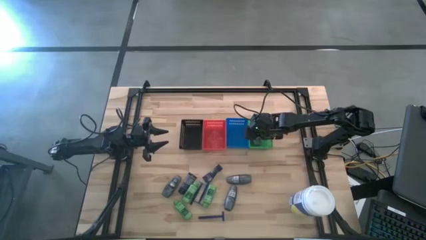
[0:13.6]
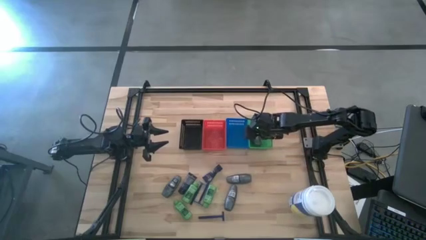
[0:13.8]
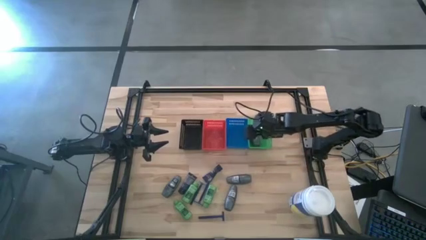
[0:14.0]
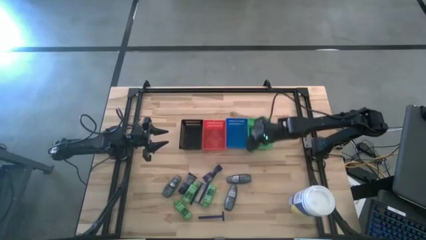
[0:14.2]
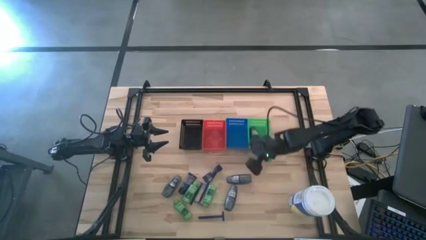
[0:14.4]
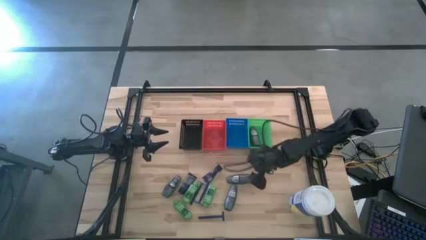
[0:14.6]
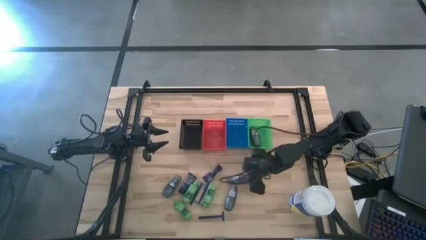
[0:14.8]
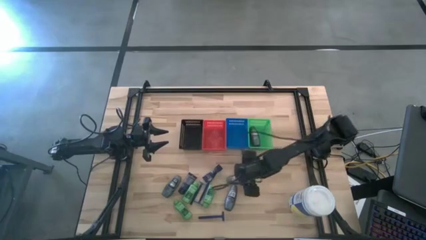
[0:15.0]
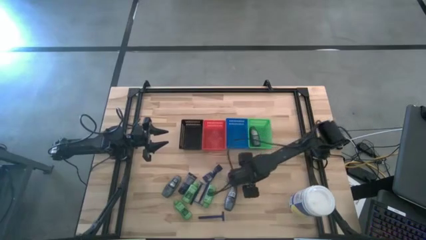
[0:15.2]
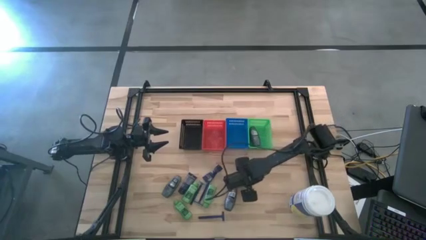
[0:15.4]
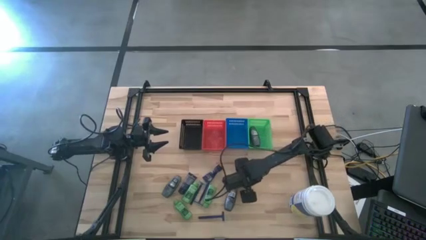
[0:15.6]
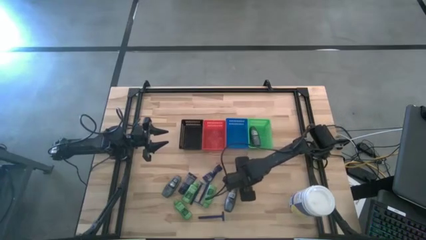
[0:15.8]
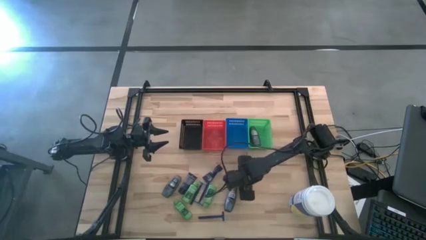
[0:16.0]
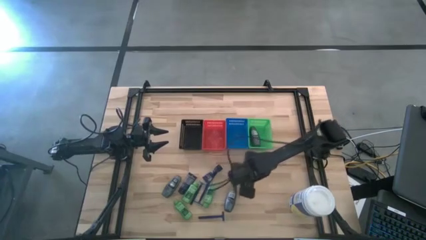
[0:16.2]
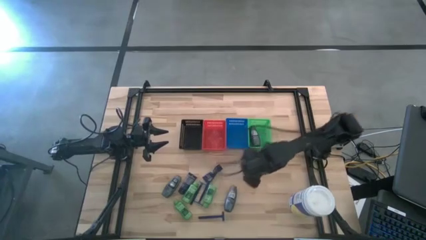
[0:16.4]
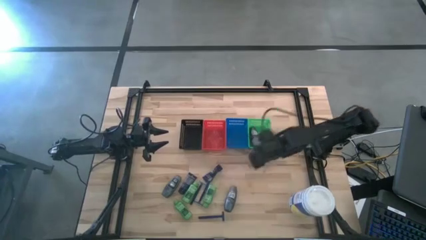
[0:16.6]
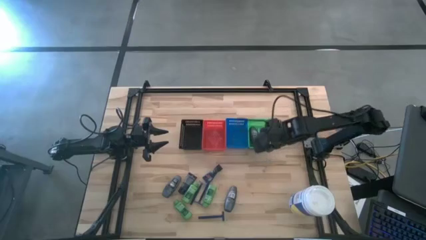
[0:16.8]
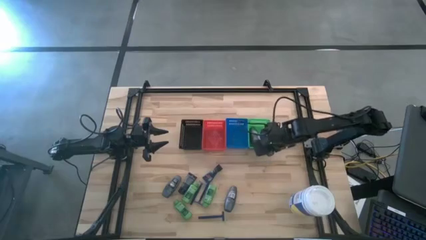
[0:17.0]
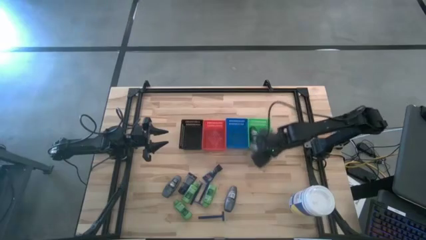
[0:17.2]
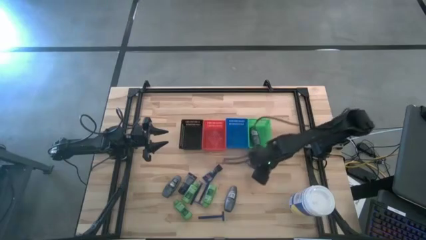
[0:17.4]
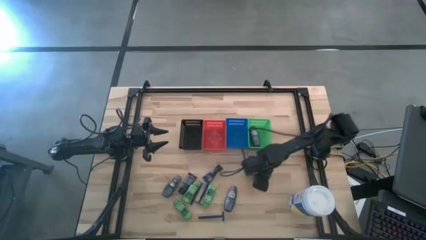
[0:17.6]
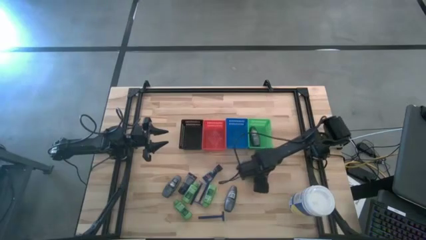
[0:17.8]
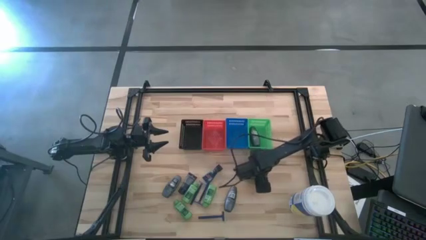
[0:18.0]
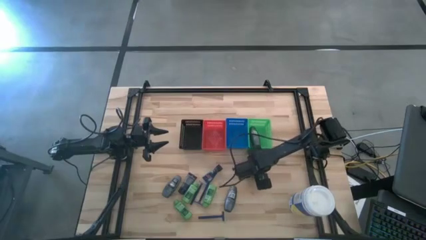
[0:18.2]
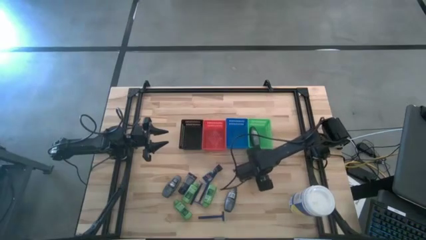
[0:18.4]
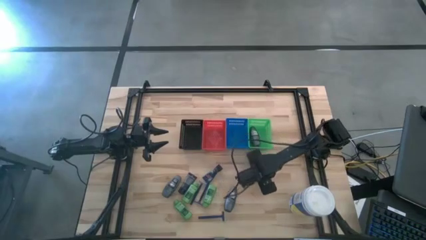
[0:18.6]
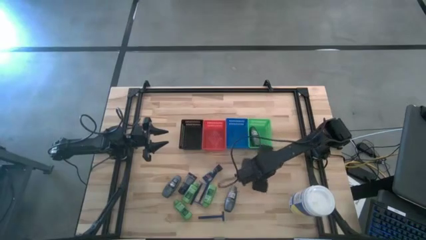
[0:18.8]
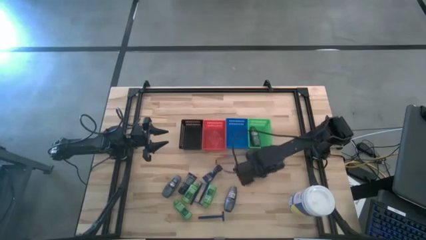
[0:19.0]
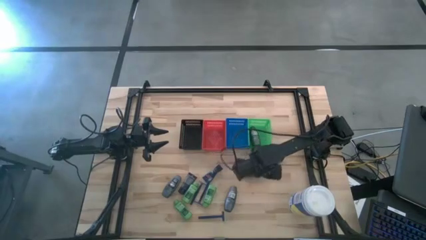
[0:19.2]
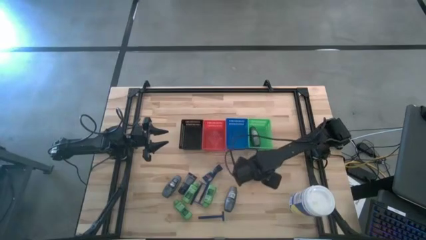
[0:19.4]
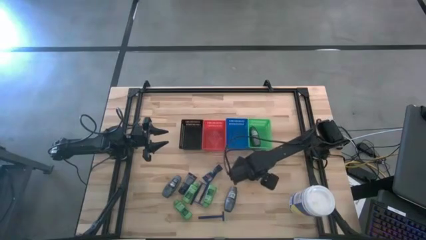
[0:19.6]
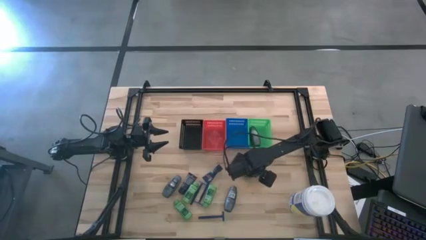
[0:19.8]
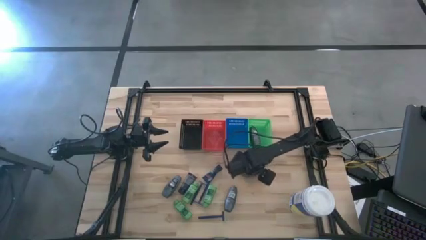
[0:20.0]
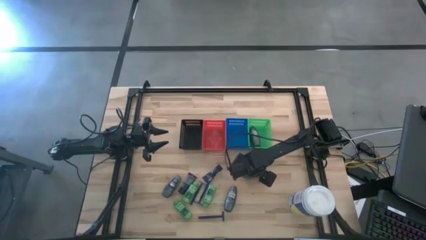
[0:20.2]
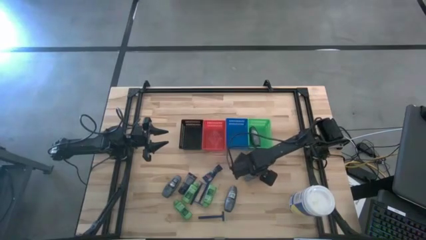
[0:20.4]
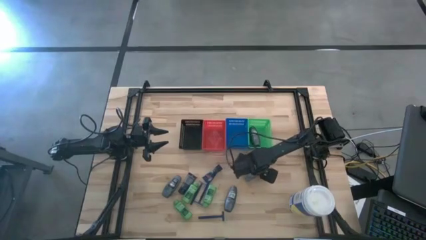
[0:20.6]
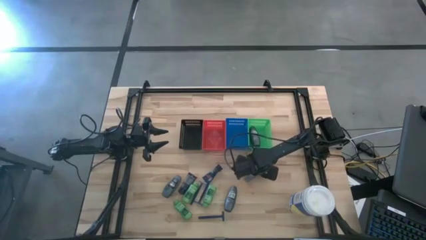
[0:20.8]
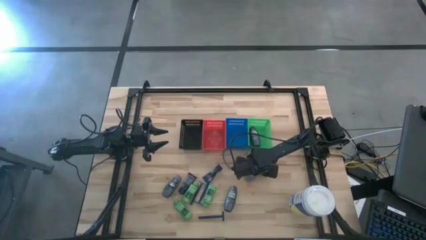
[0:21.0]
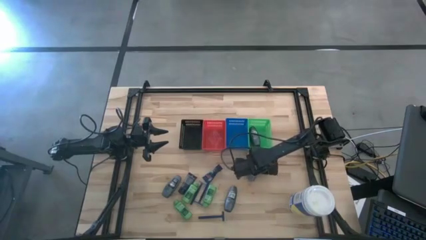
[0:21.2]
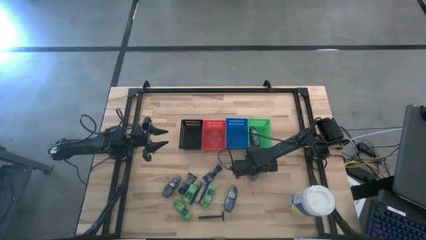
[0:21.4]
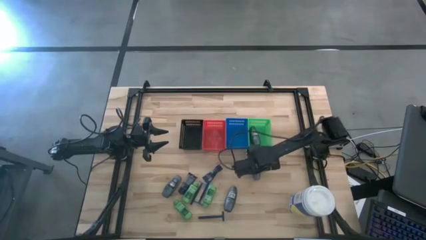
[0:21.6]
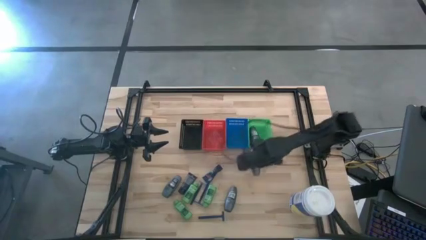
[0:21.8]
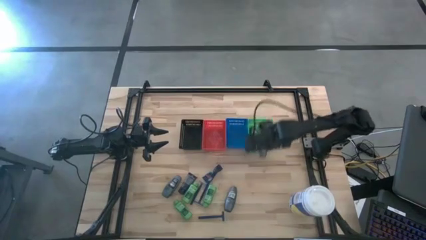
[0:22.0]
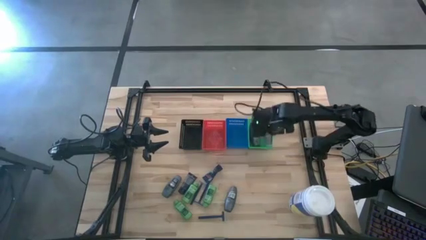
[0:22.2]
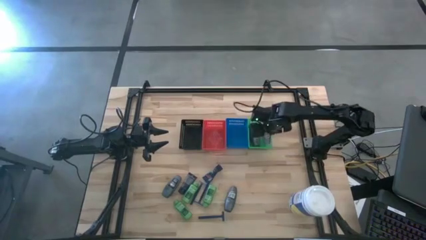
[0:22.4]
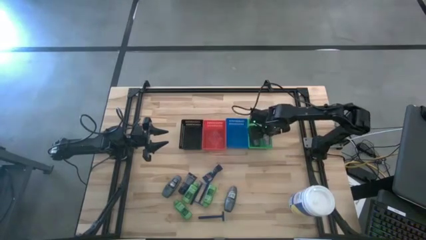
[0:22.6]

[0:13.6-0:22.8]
Task: Pick & Place Travel size toiletries
Put the black deodorant into the green basket

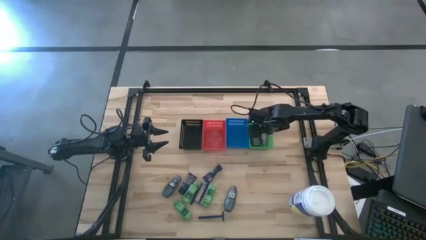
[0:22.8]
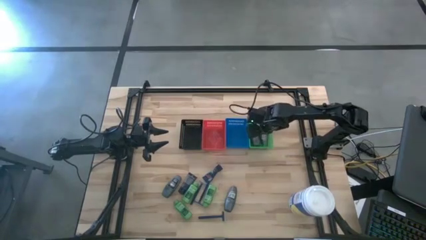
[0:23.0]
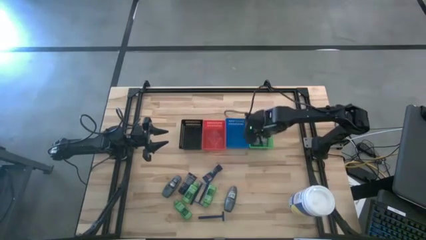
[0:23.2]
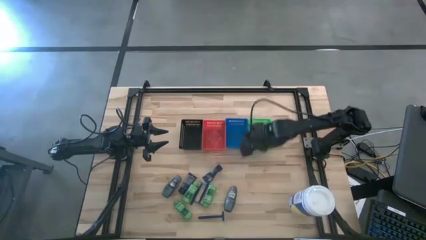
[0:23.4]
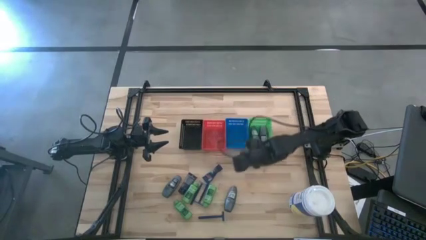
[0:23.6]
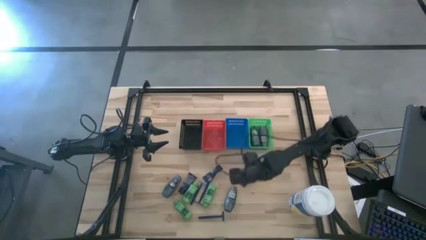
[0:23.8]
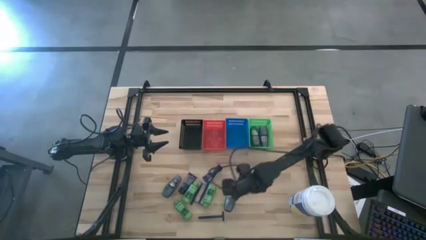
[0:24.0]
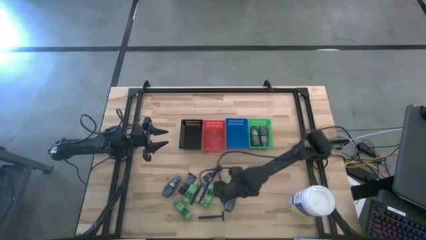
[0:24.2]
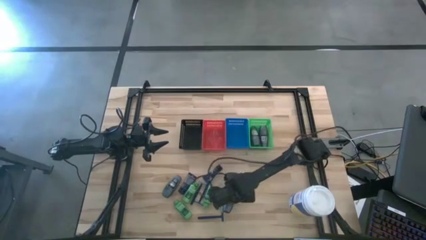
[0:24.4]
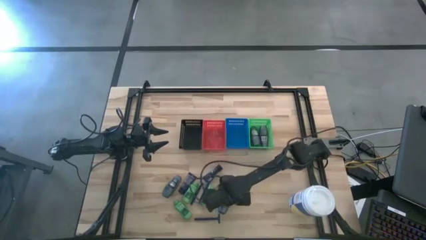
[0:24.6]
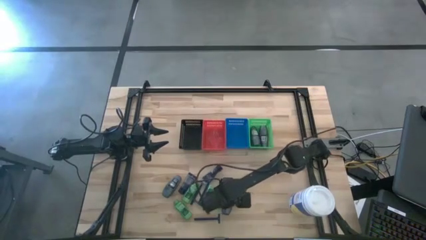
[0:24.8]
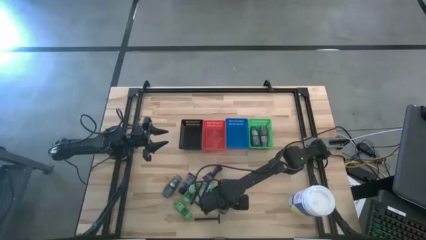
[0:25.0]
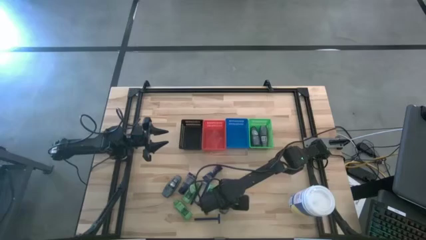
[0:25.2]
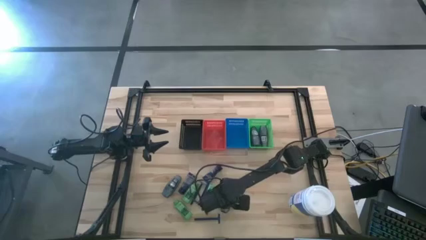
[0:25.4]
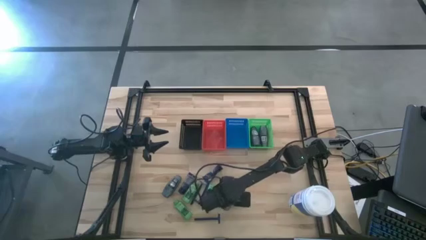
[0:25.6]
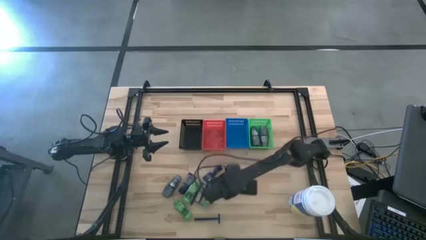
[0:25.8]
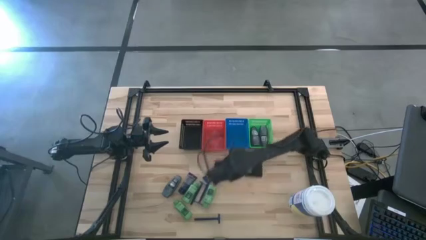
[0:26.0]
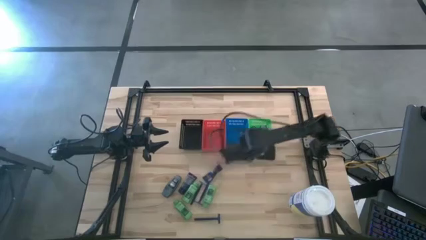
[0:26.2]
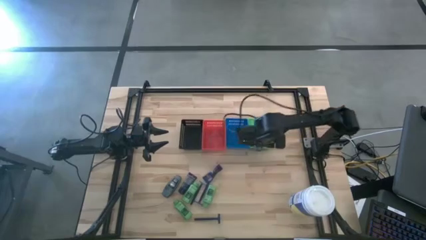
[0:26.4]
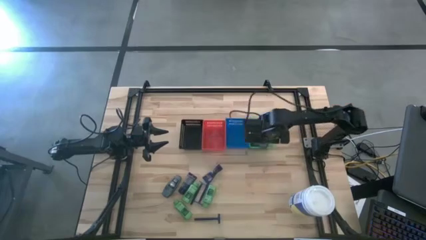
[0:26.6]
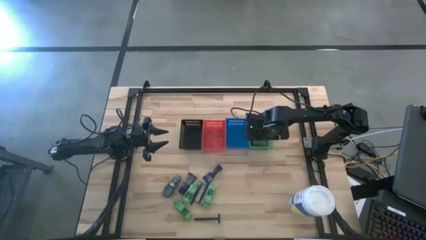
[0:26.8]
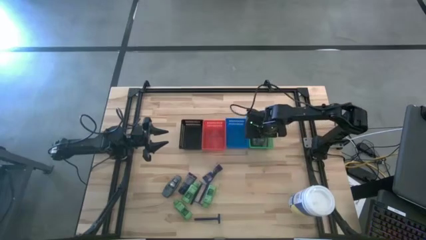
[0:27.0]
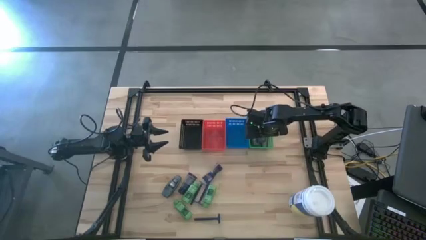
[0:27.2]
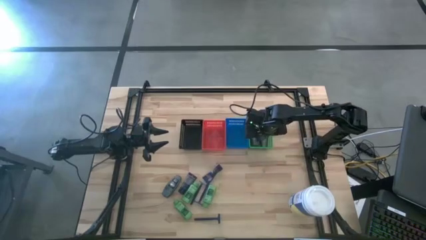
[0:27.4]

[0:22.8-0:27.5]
Put the black deodorant into the green basket

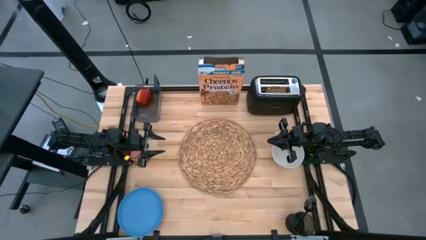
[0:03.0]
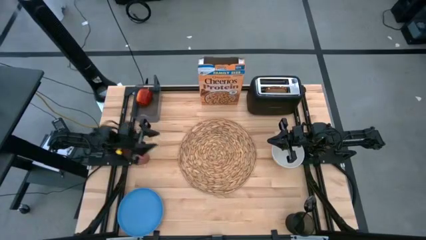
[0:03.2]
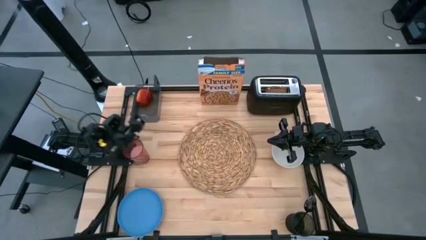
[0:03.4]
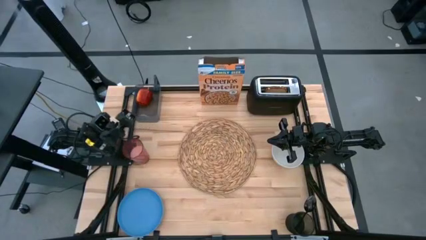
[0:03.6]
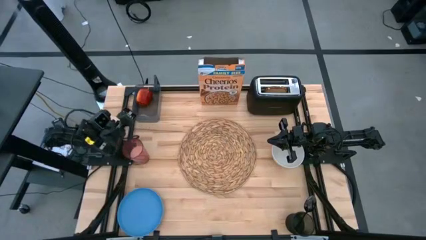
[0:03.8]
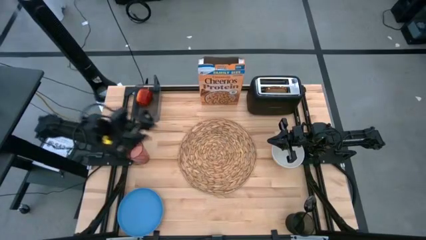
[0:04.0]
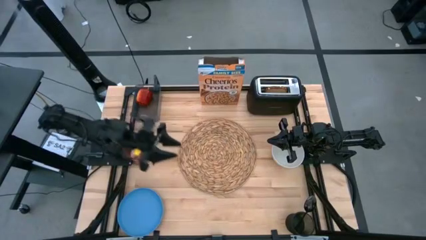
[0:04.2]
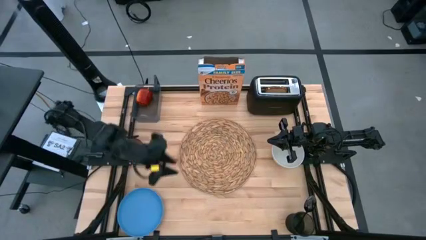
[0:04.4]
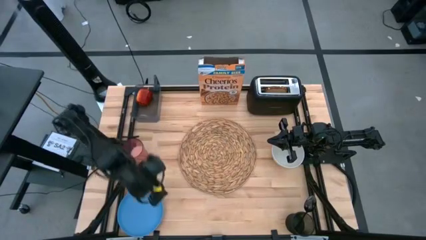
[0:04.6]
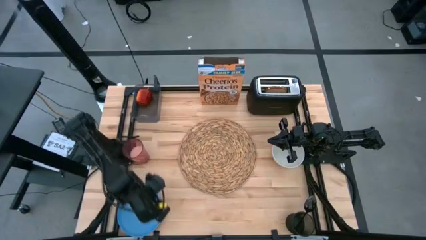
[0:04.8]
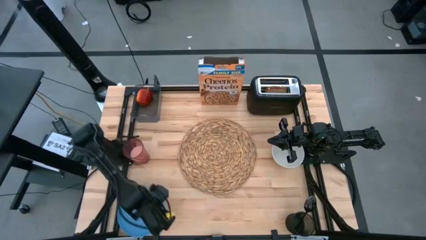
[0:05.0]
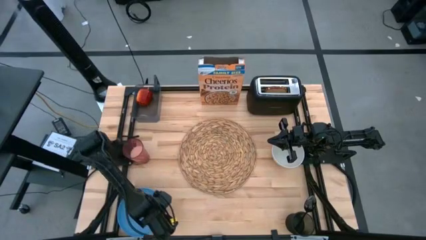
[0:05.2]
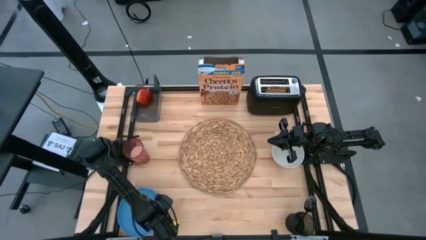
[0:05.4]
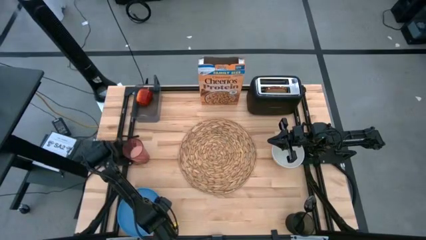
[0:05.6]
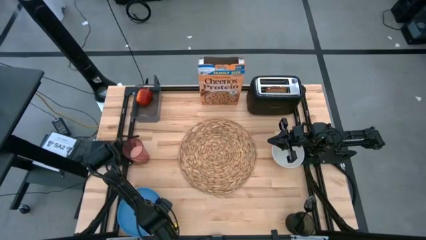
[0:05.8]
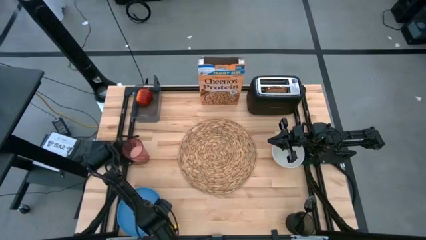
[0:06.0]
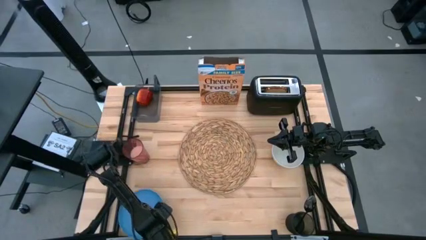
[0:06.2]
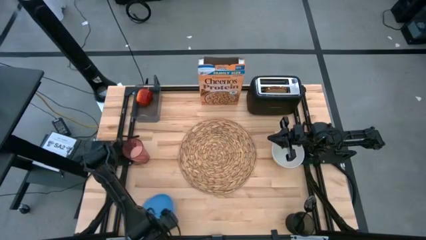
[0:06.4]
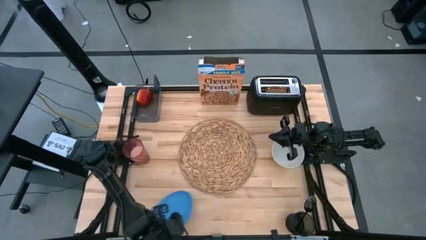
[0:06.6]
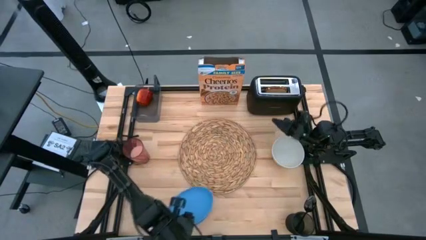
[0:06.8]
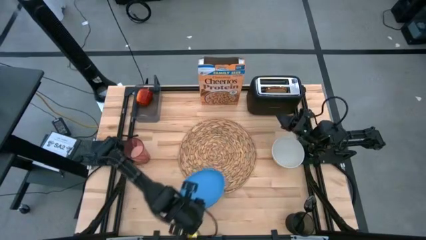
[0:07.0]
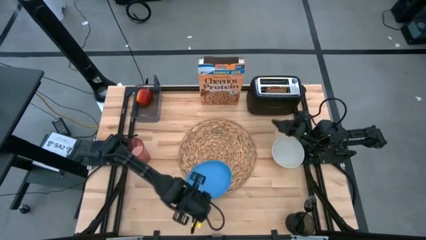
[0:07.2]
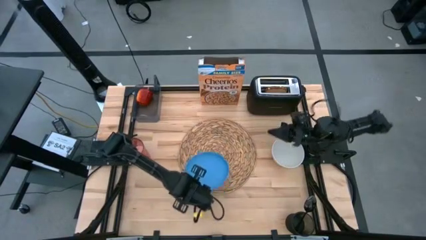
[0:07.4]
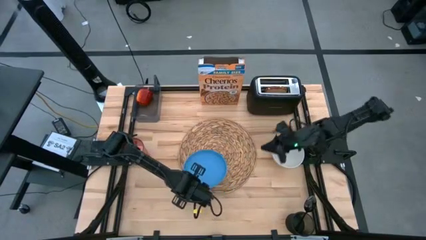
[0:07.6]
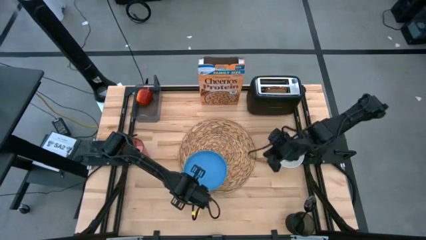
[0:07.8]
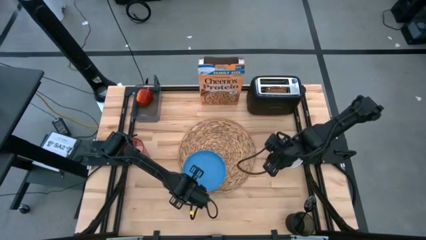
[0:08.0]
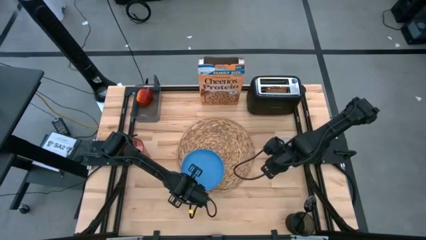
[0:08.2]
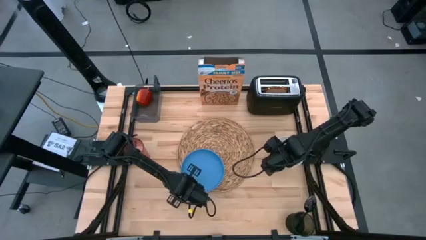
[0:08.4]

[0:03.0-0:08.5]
Task: Arrange a breakfast setting
Put the blue plate on the brown table mat
